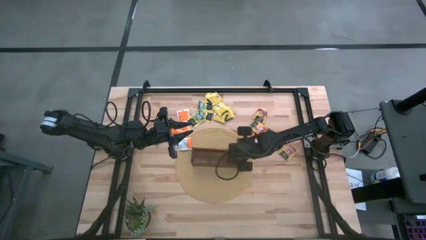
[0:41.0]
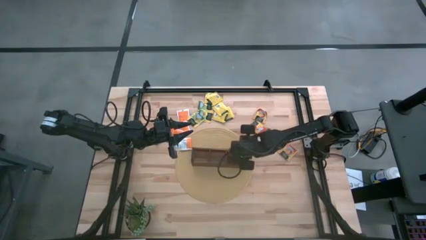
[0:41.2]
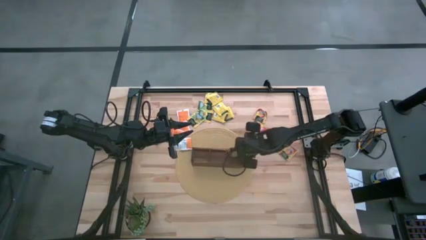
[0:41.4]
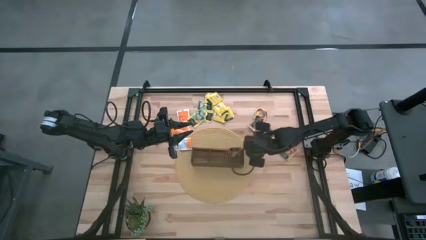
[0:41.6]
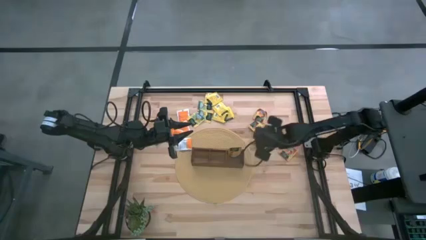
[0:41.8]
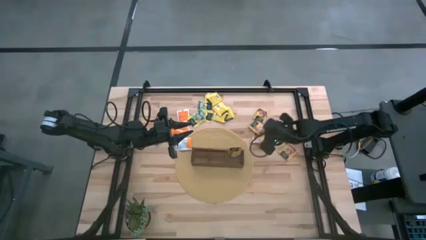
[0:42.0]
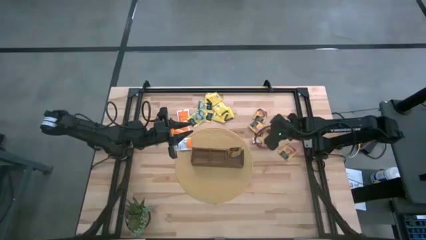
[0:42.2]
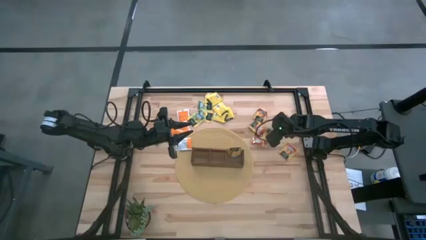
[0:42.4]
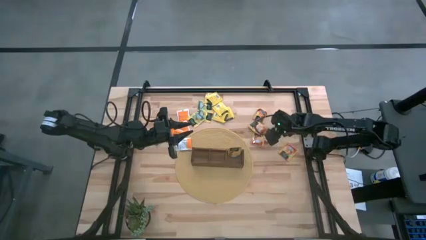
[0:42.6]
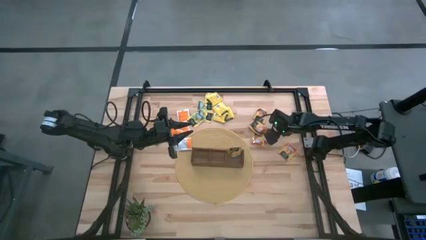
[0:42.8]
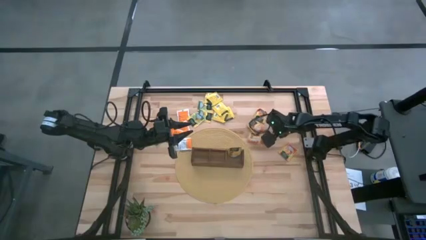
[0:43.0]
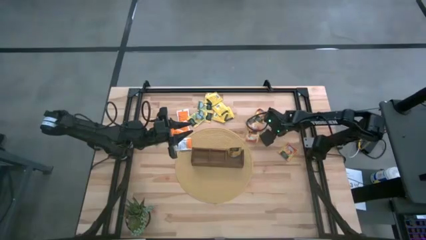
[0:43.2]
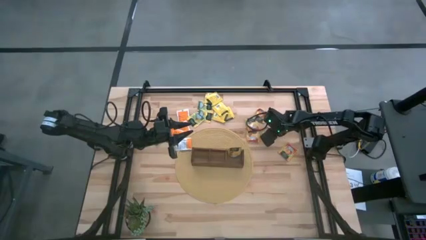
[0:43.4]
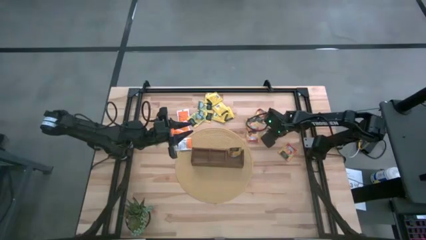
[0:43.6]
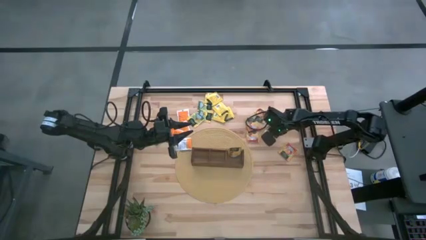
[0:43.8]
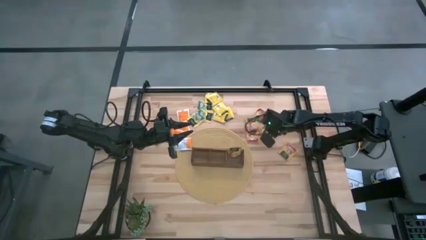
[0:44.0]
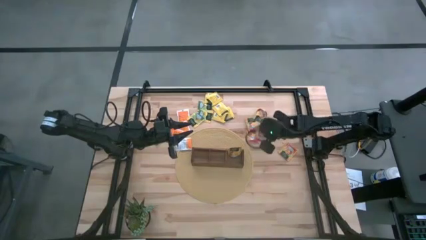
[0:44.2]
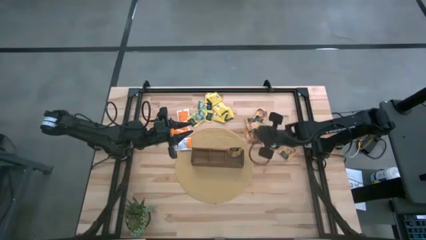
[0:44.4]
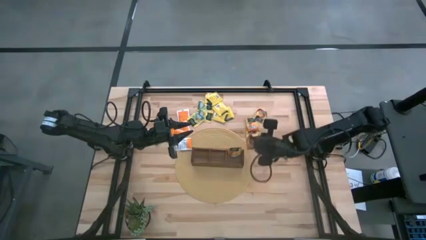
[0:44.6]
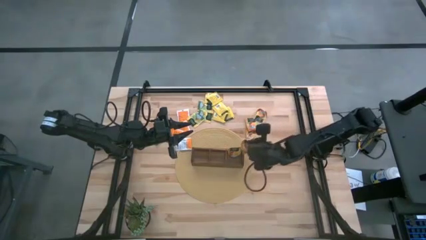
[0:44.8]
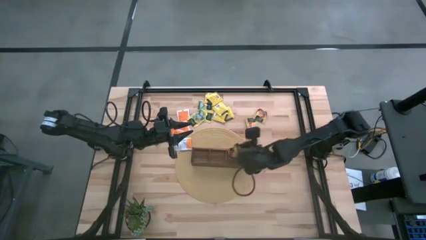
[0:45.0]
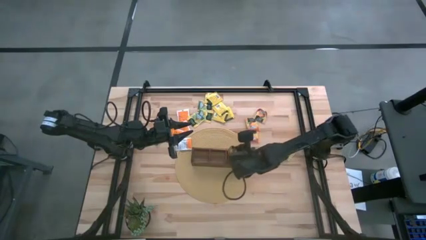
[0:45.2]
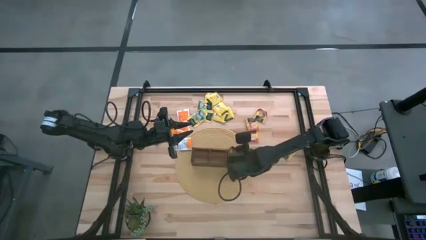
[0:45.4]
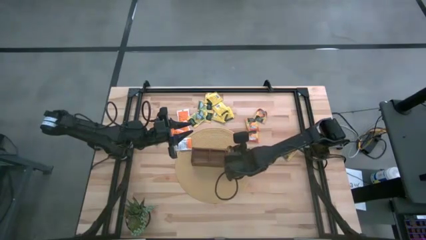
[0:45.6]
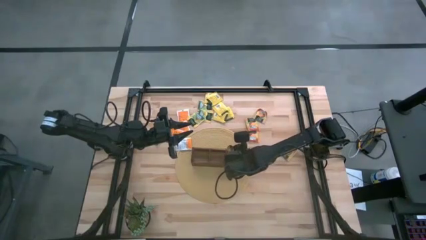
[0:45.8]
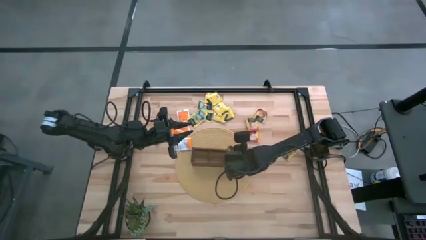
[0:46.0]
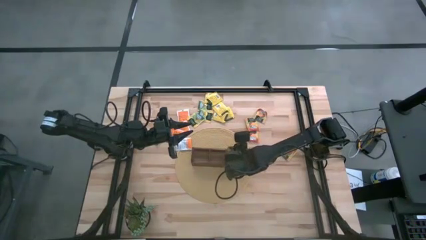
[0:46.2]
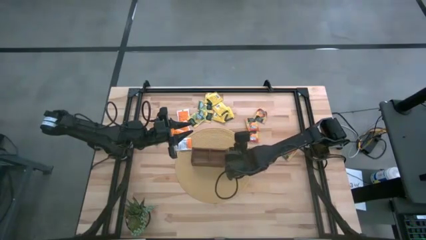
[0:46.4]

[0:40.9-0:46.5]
Task: Pick & Place Tea
Put the orange and green tea bag into the wooden organizer

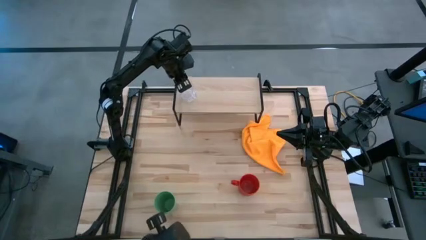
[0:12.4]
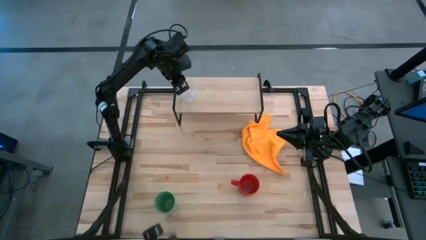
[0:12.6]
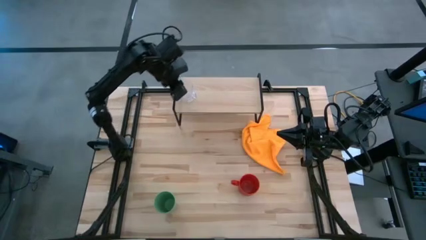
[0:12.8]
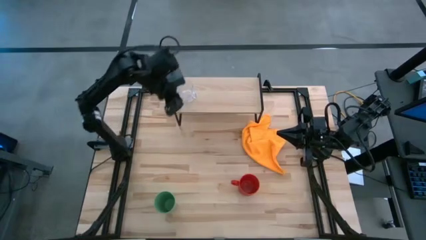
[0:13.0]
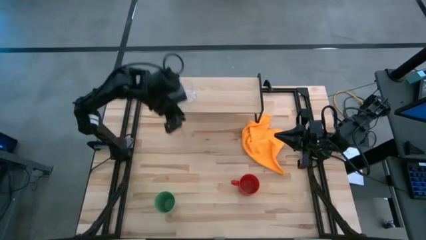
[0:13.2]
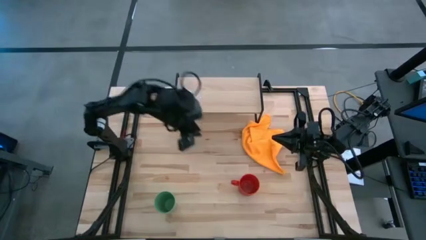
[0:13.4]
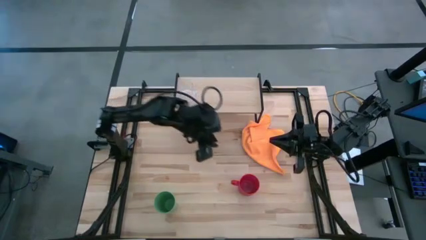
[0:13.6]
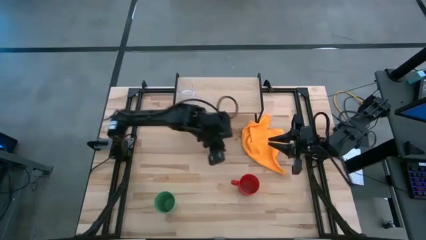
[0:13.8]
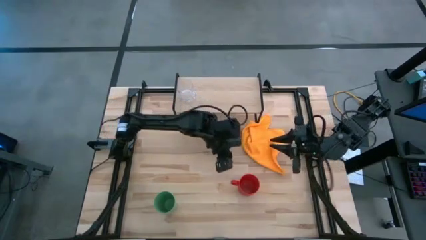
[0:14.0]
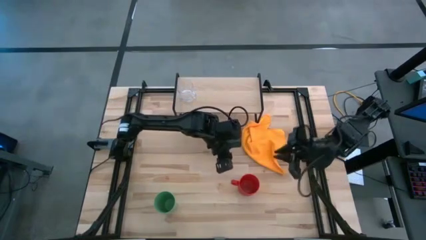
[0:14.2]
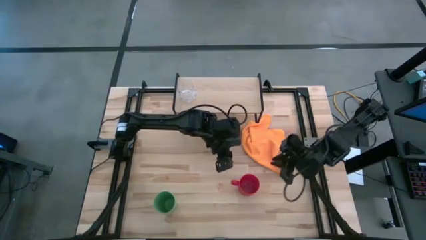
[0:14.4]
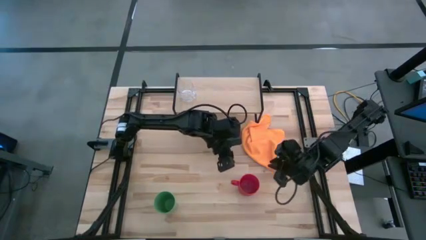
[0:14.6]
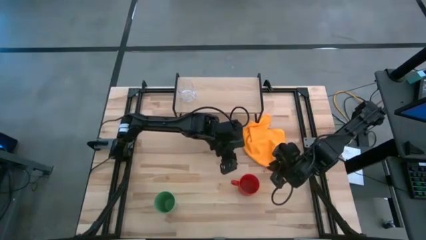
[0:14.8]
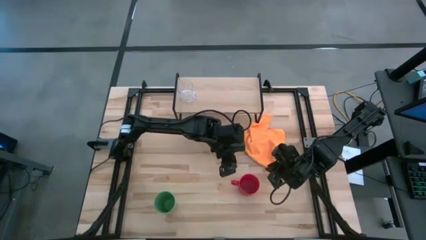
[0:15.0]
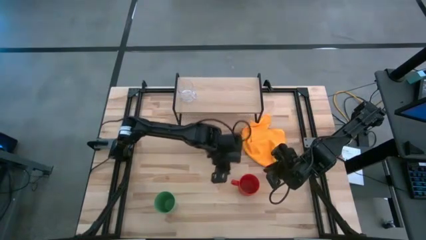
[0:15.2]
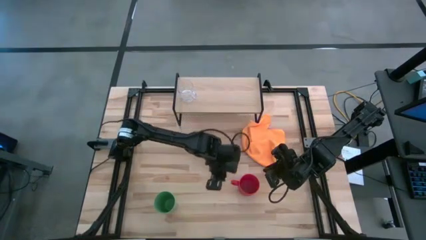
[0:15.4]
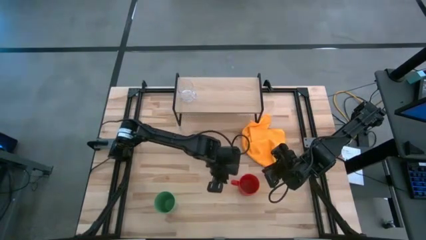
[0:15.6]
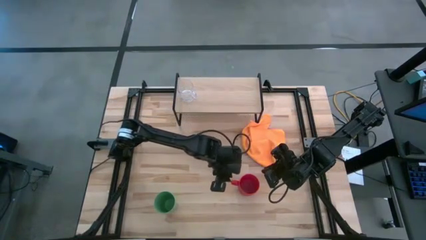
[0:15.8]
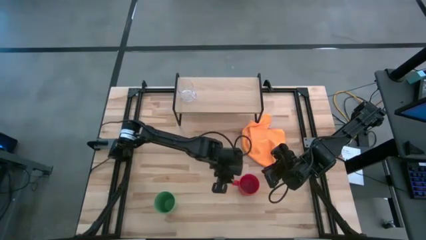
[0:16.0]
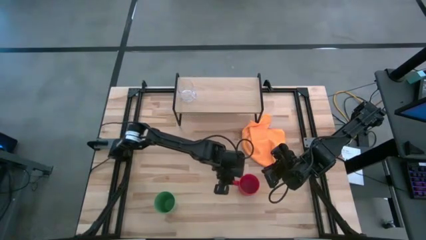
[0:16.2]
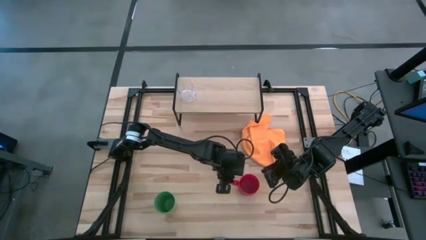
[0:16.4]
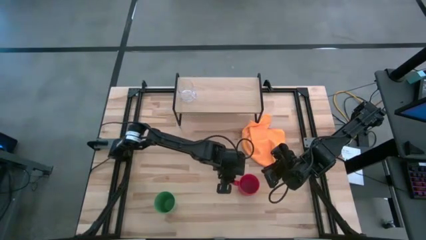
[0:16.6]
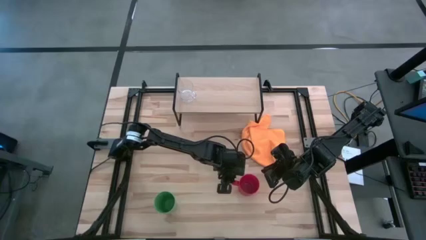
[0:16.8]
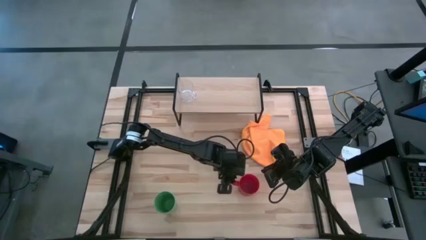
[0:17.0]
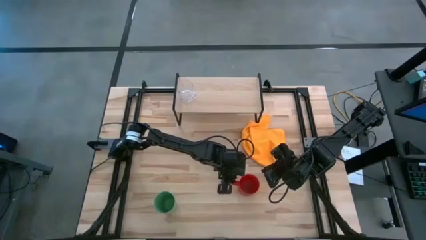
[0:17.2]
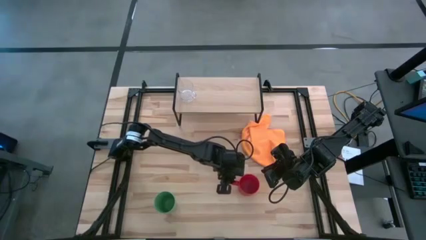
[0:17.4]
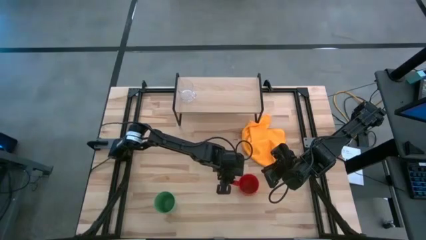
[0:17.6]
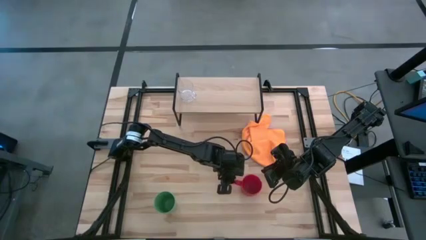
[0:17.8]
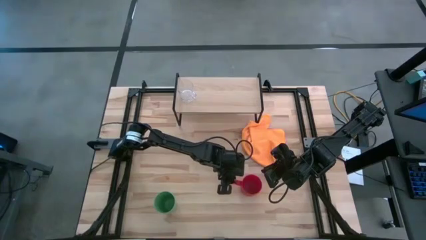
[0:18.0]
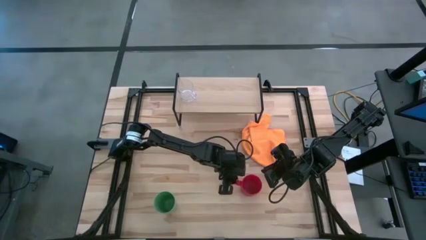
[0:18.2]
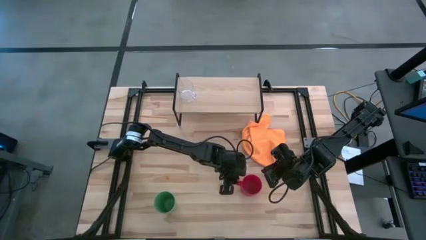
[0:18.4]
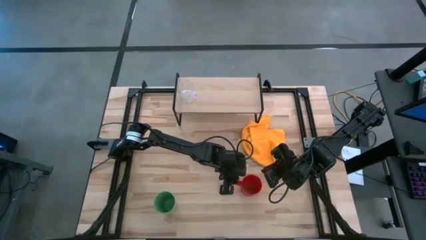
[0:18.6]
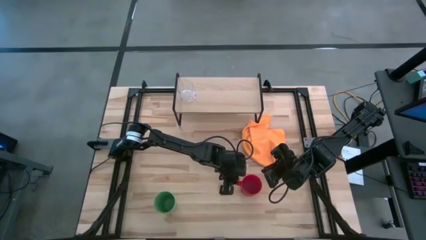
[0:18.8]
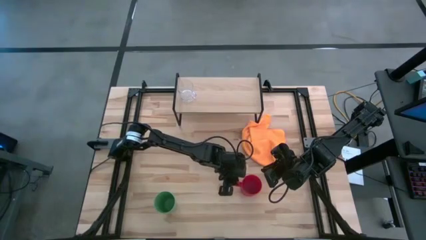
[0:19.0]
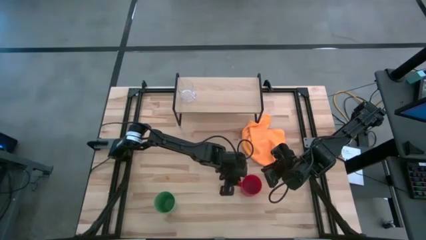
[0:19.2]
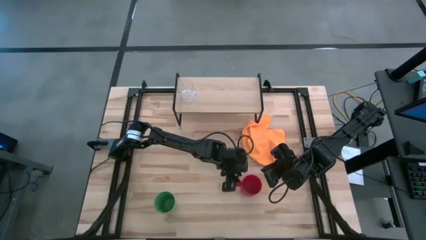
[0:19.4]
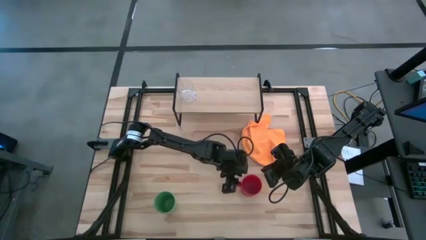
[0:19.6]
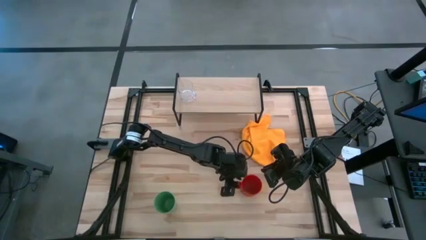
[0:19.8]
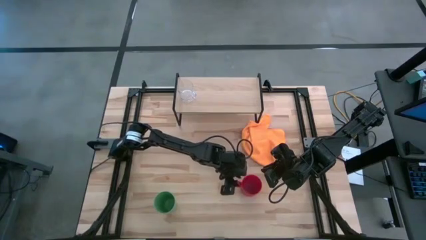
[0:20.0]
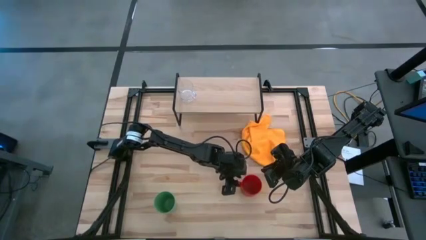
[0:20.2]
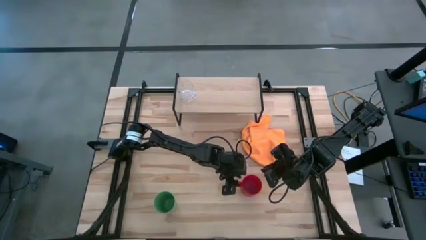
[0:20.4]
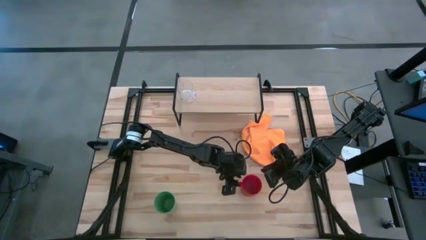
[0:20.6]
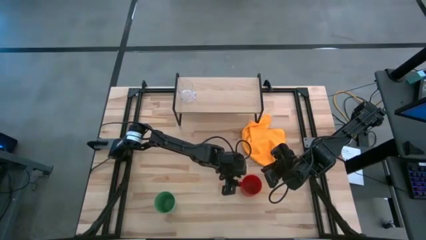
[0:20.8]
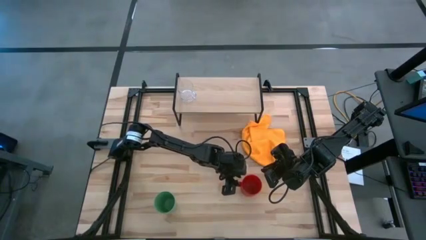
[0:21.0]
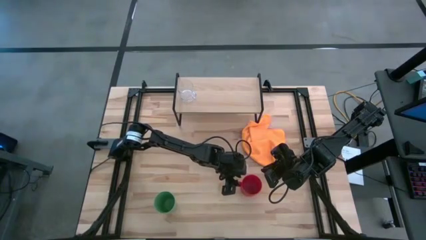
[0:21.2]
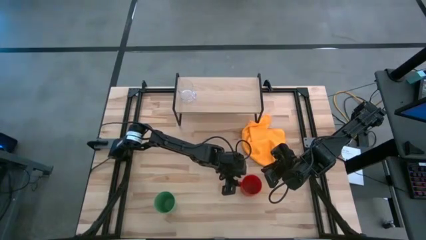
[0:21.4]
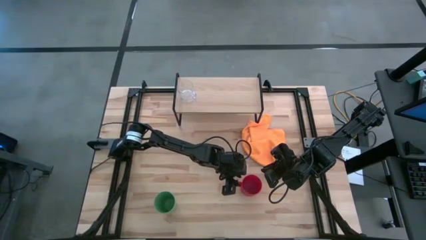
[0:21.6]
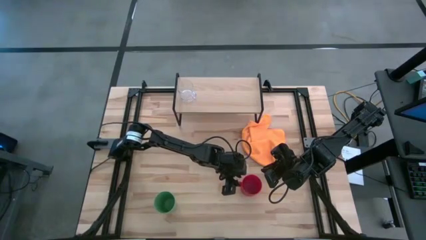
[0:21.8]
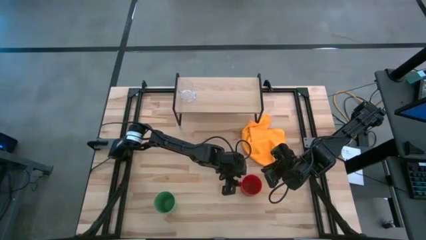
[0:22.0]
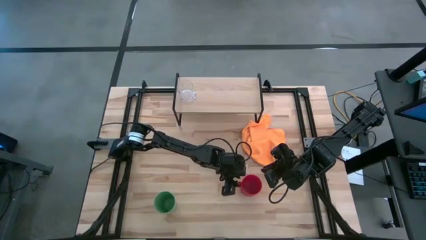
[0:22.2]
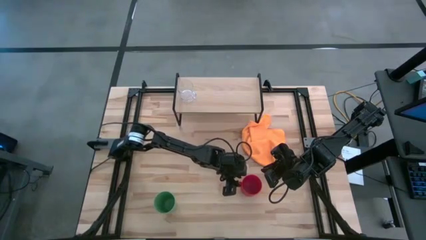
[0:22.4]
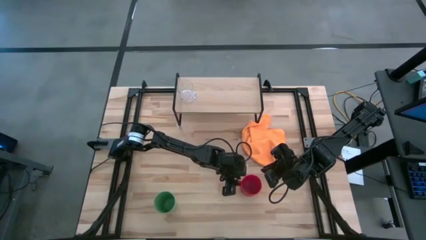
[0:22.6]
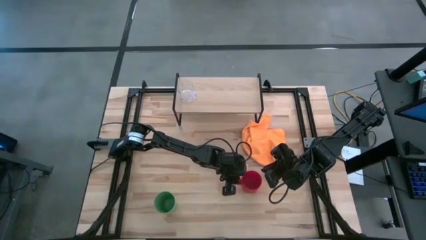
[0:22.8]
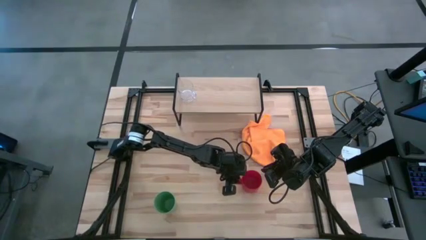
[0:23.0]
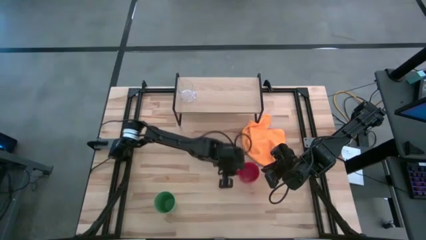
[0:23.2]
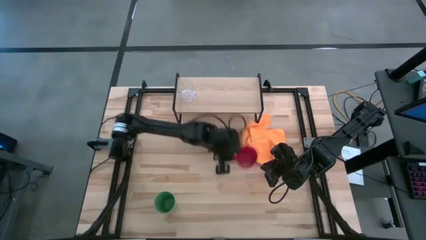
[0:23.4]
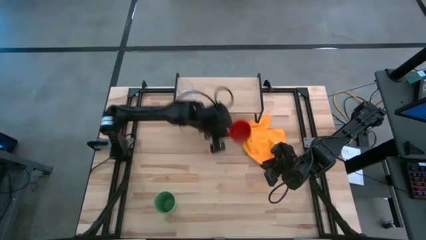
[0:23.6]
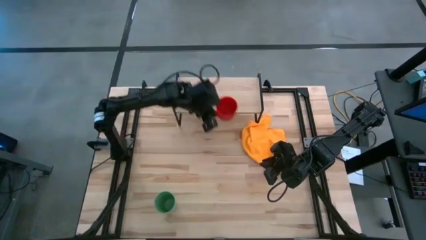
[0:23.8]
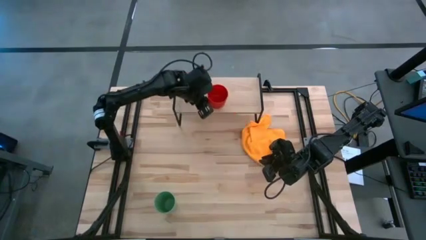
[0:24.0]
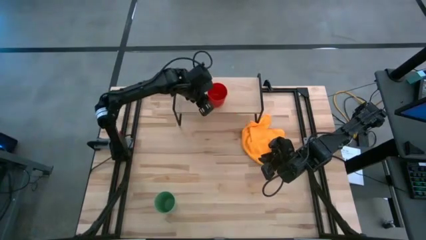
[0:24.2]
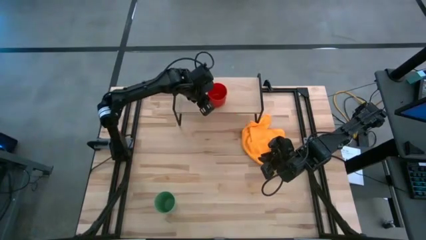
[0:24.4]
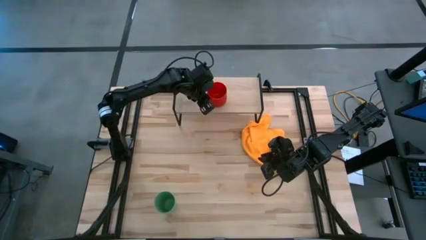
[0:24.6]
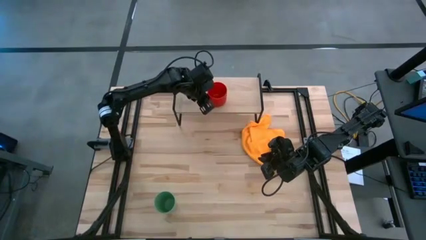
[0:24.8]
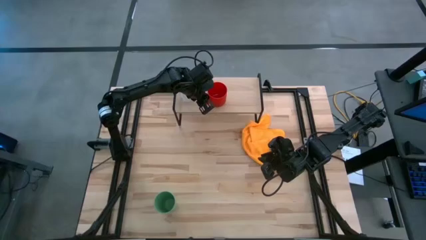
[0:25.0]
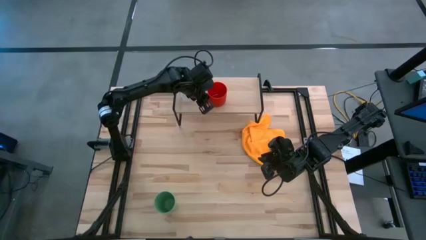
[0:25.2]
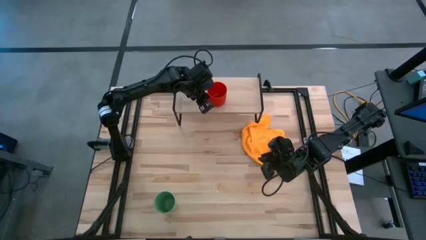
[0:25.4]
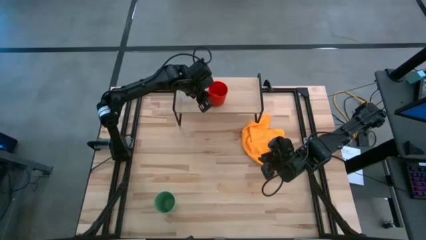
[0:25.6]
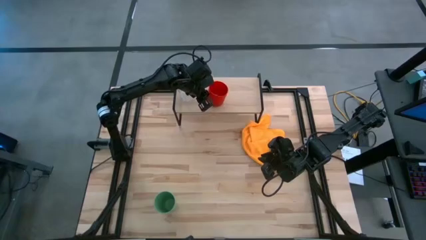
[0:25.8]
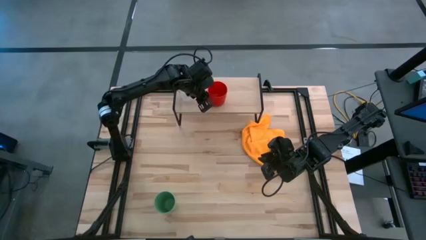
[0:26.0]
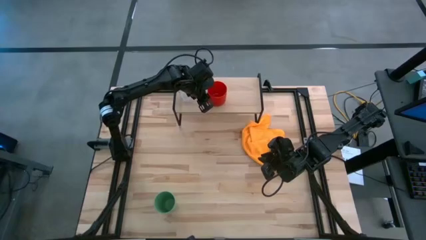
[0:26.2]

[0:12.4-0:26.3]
Task: Stack small to large cups/mugs on shelf
Put the red mug on the shelf
